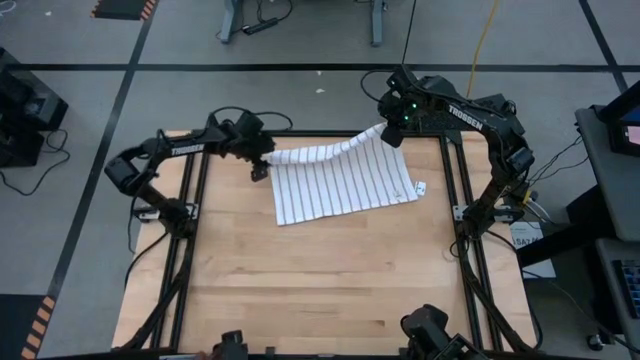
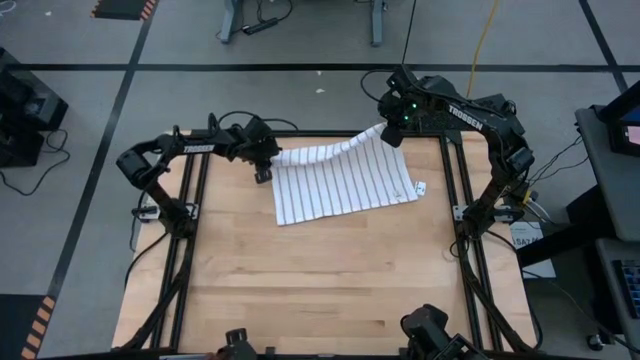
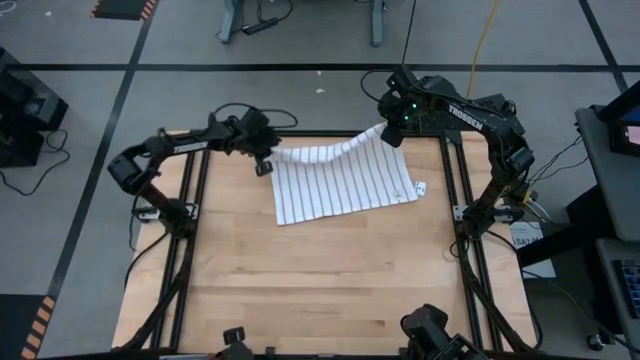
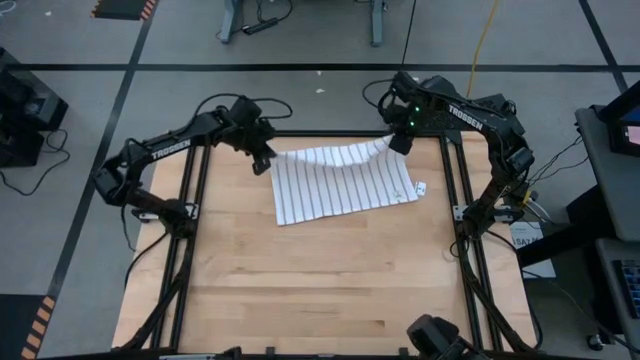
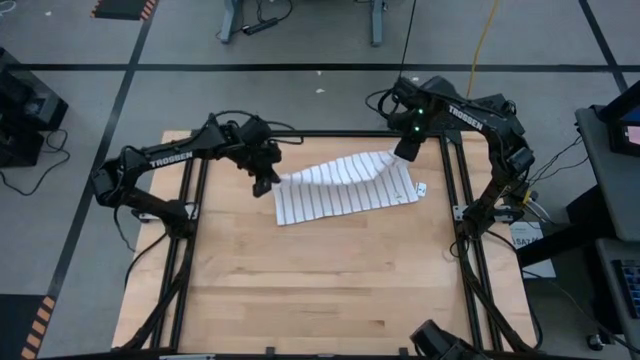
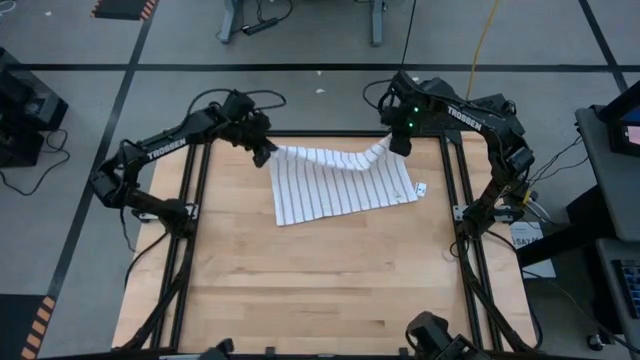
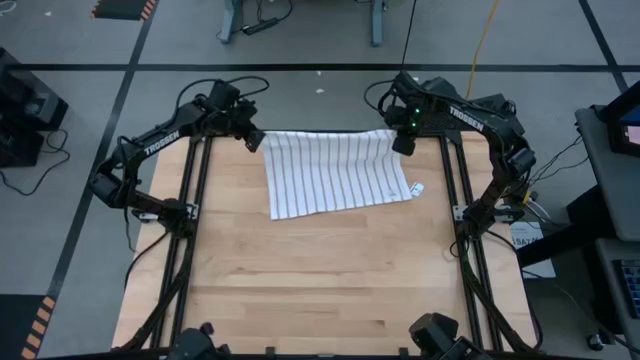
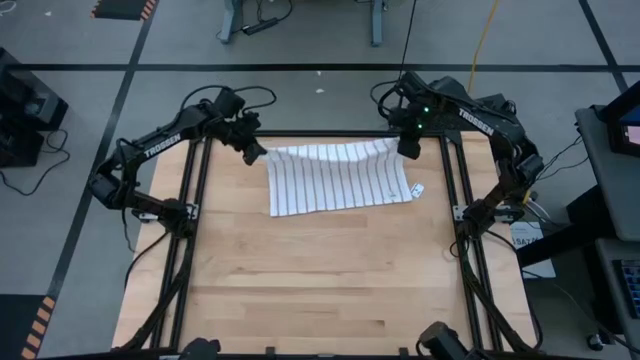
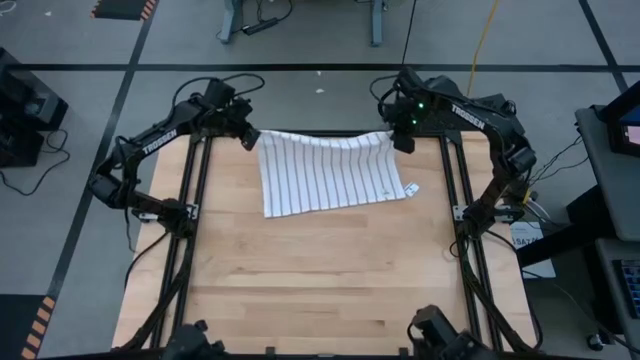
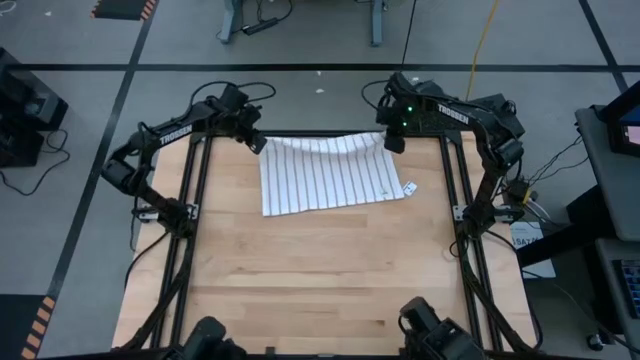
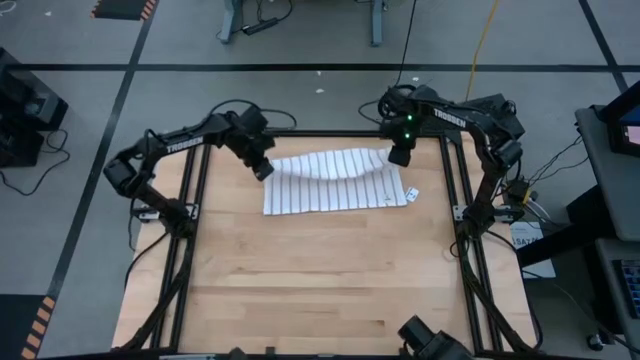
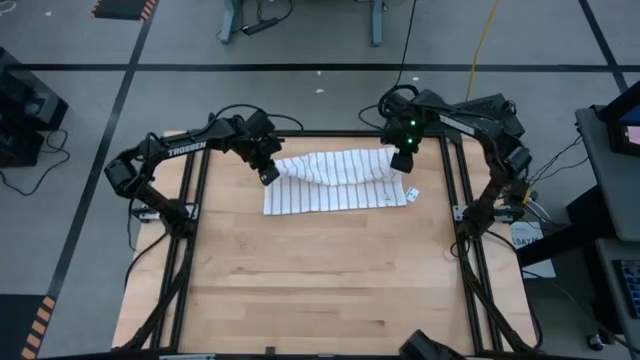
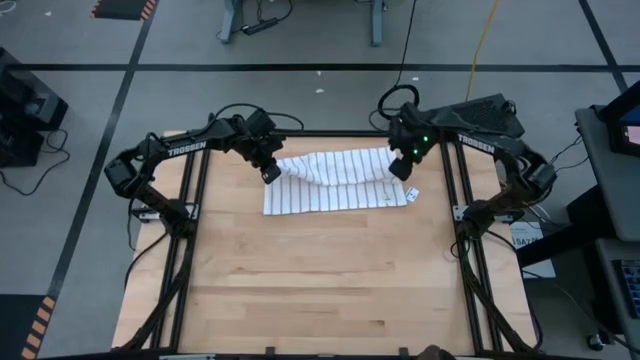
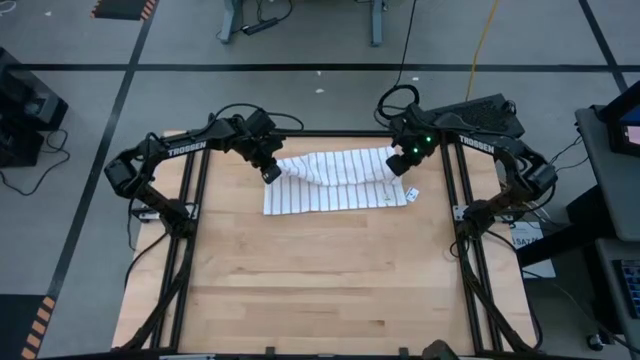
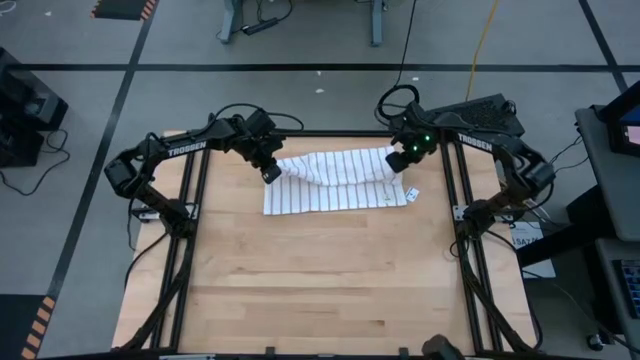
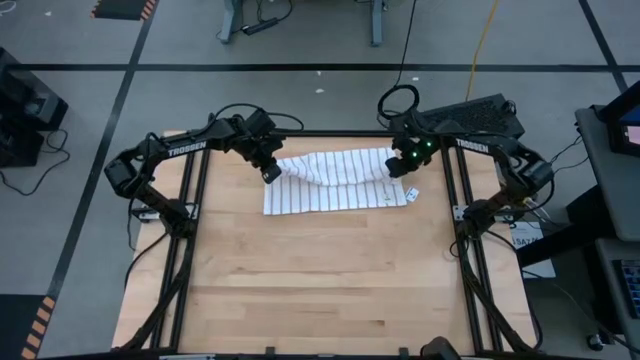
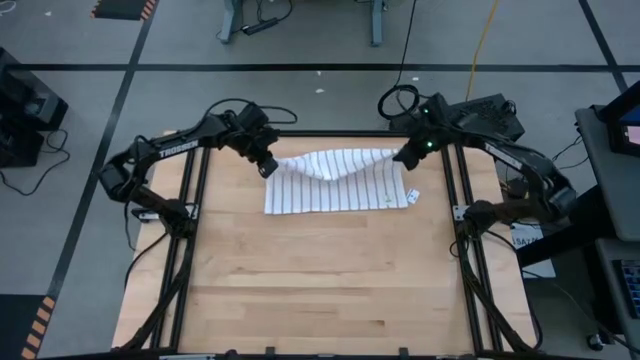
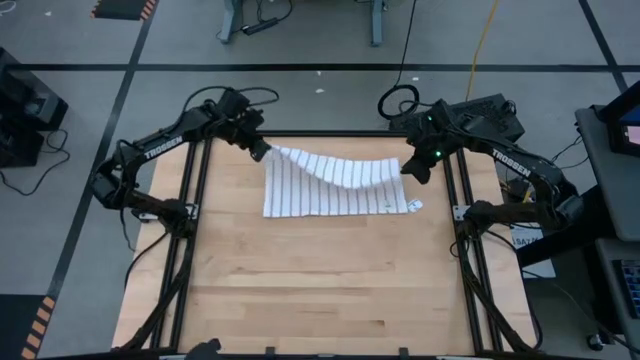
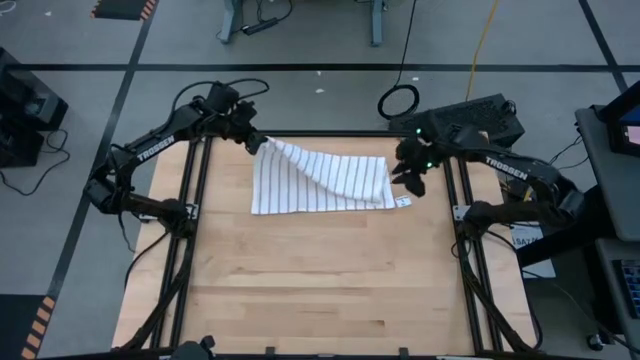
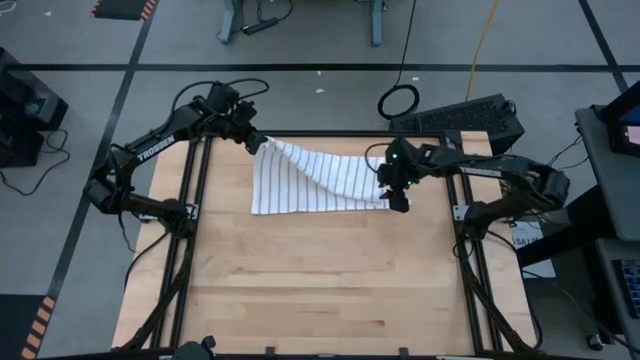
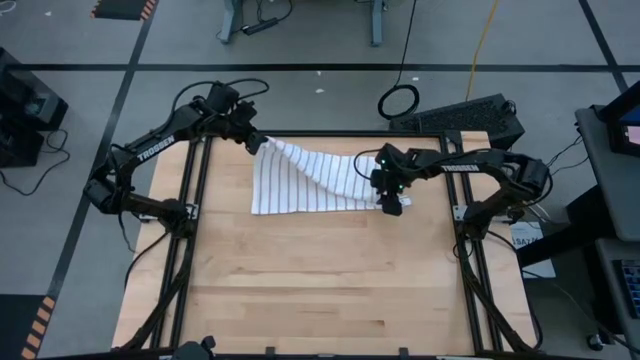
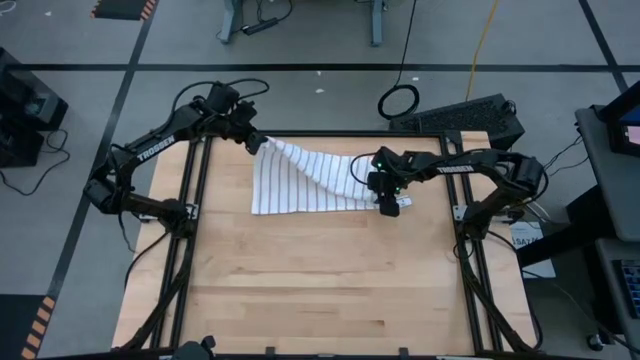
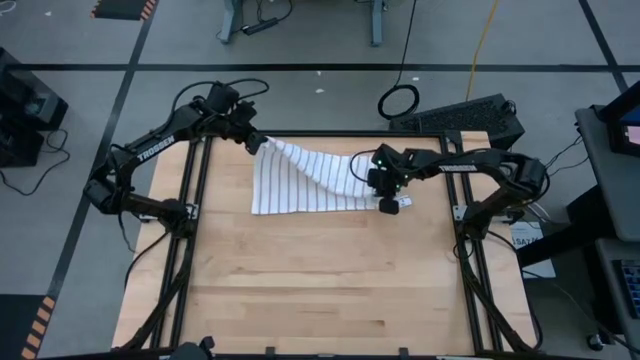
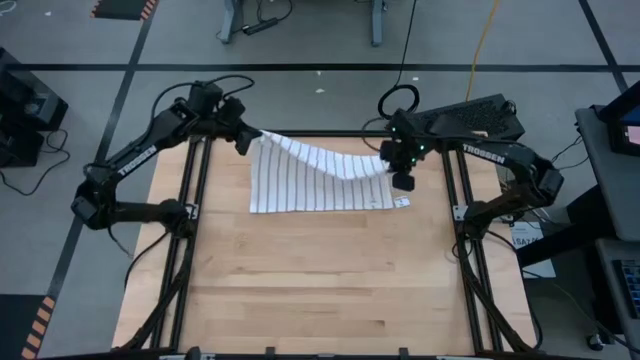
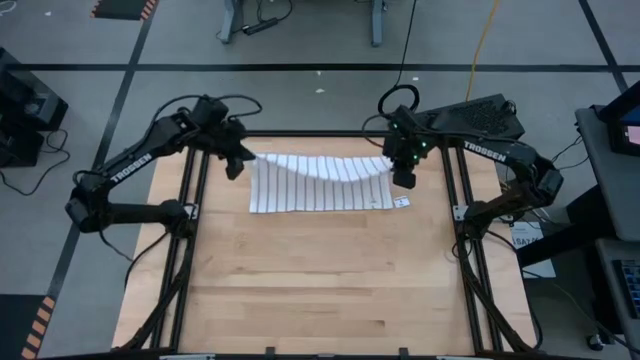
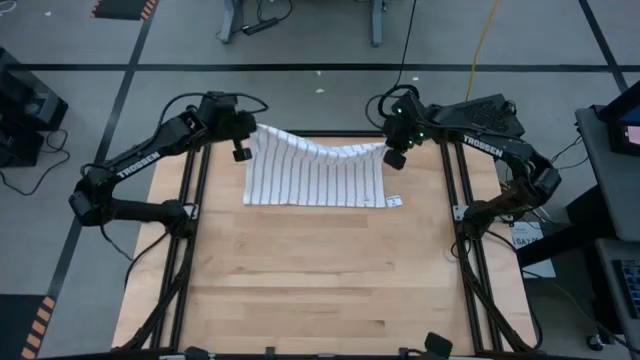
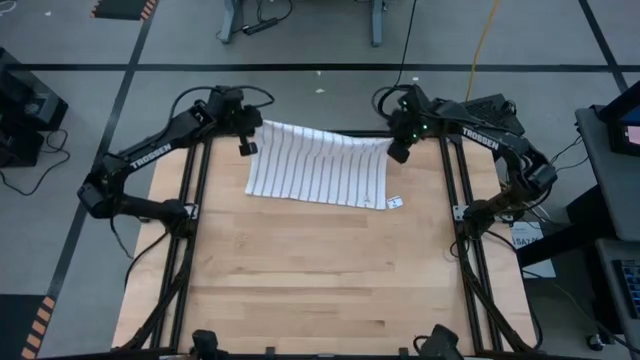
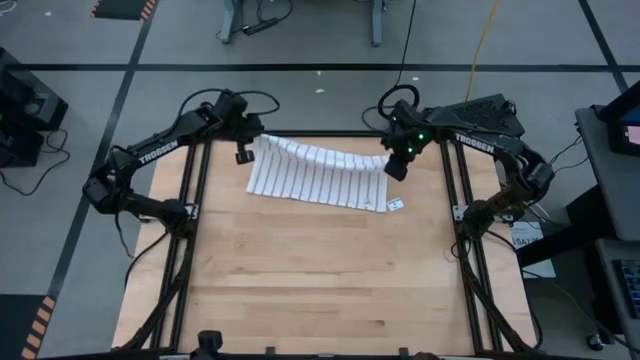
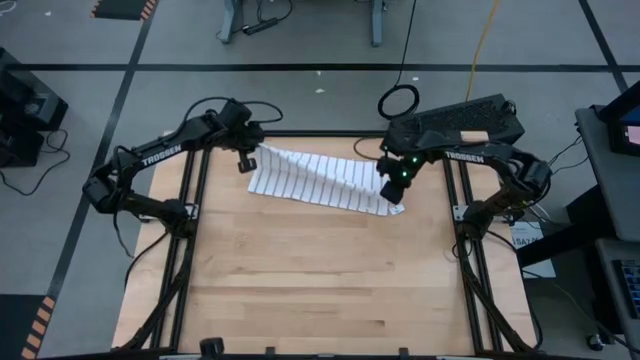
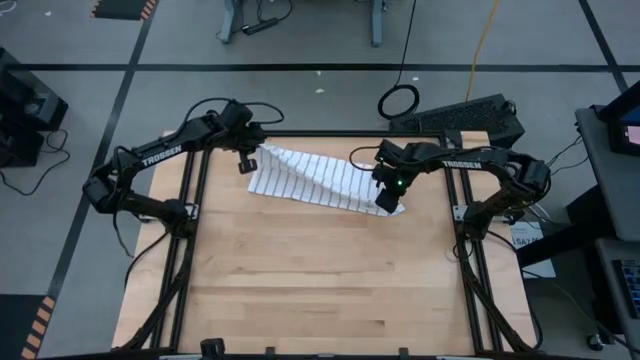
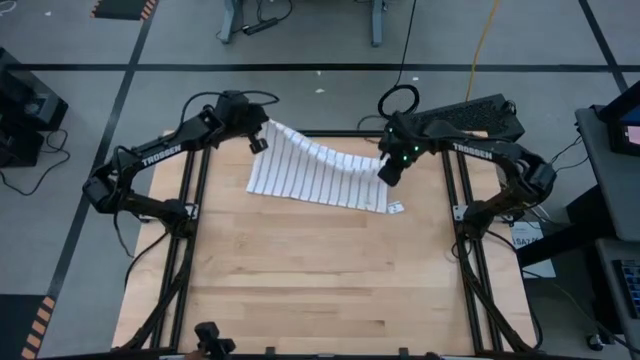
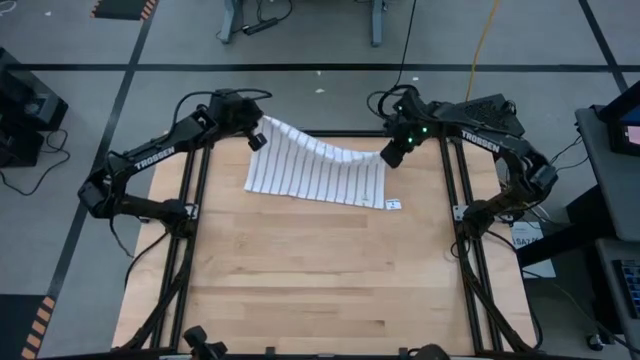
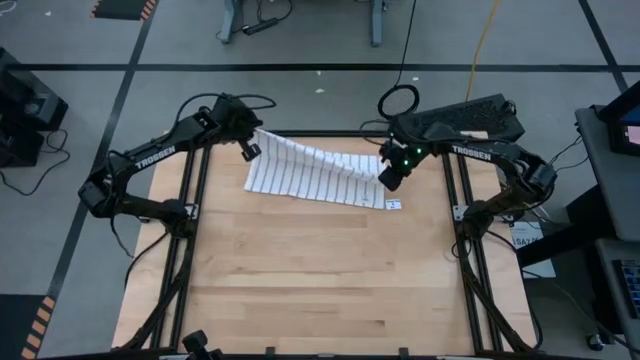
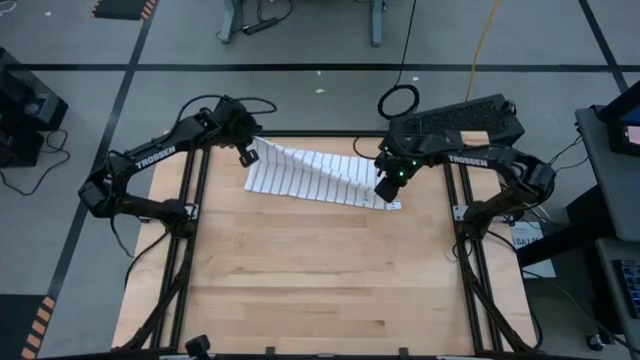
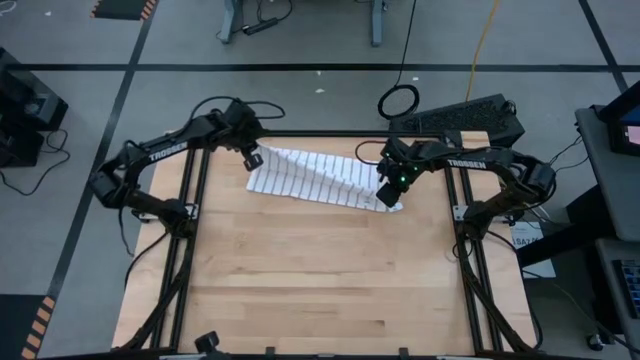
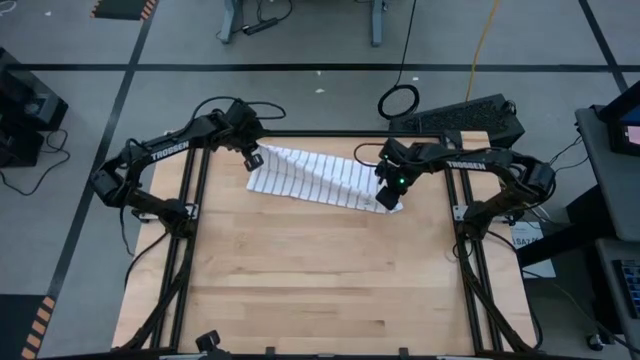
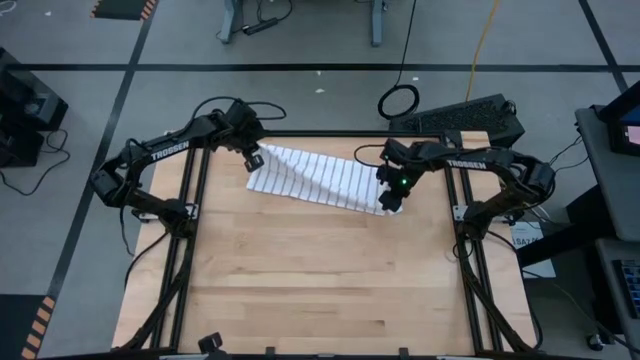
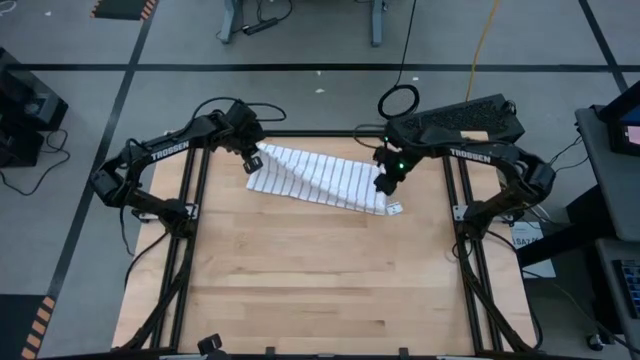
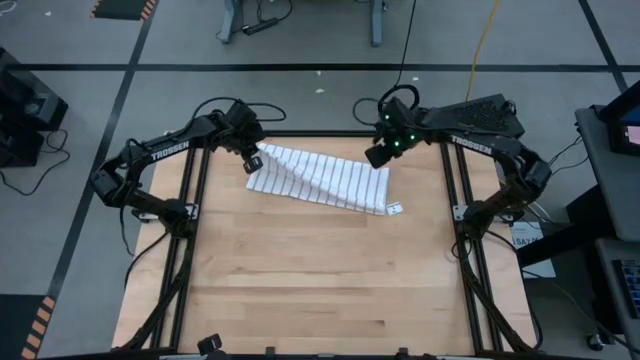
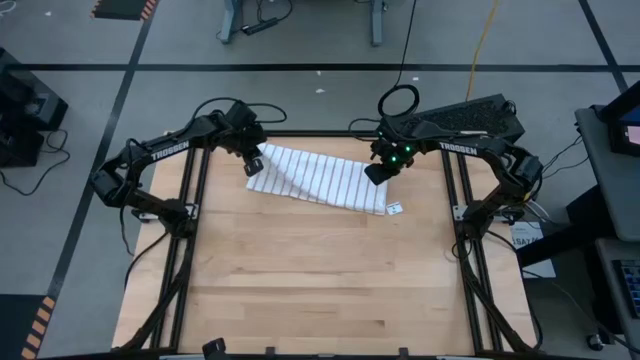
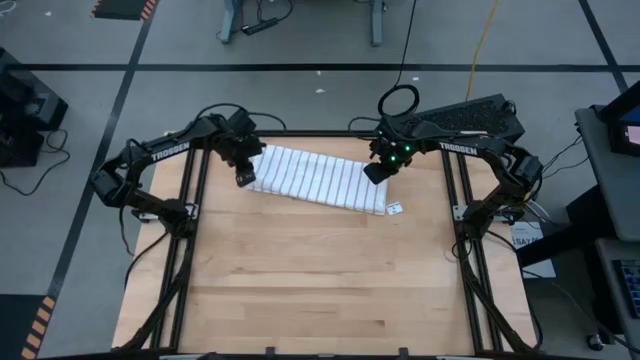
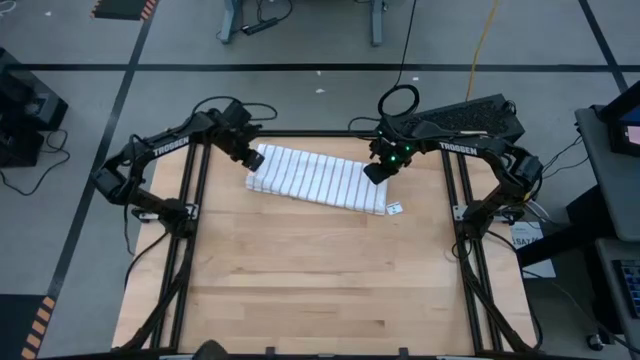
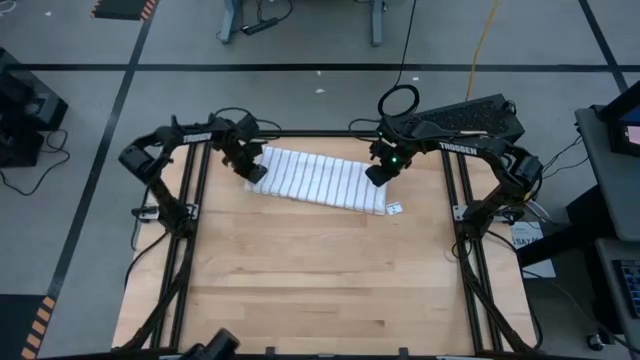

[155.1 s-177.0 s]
Task: Roll towel
Roll the white towel
